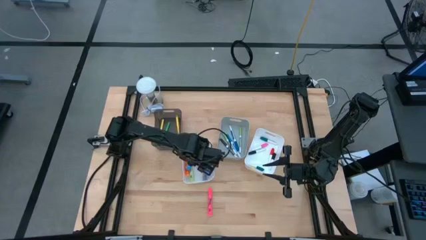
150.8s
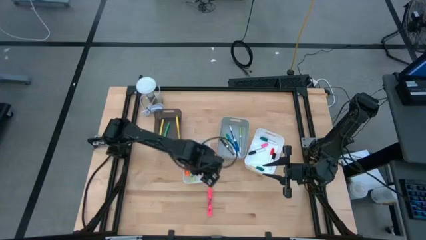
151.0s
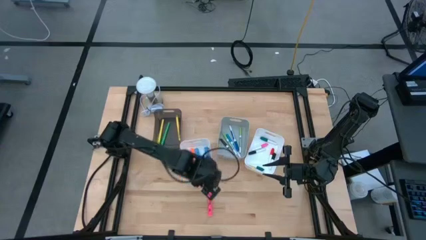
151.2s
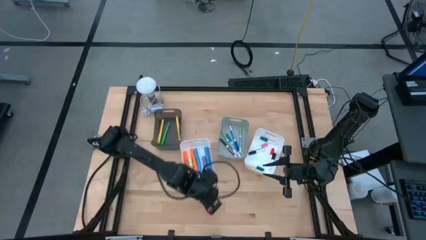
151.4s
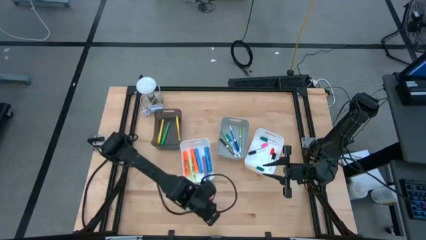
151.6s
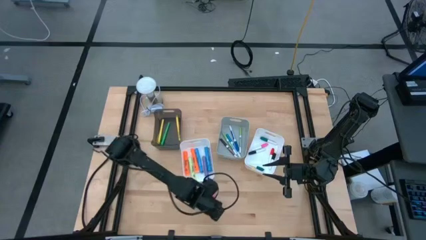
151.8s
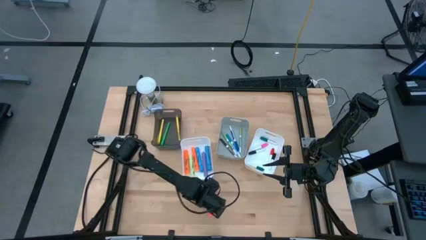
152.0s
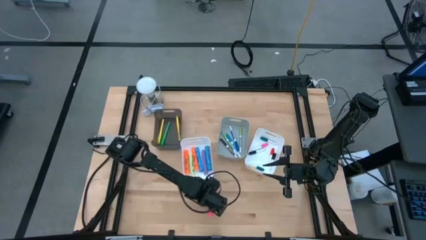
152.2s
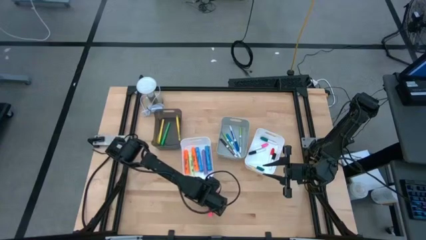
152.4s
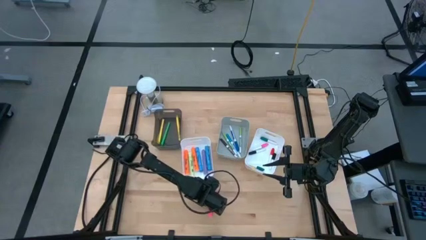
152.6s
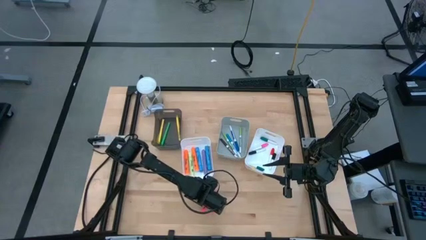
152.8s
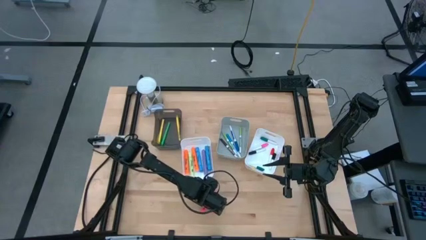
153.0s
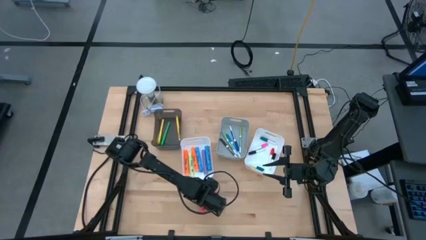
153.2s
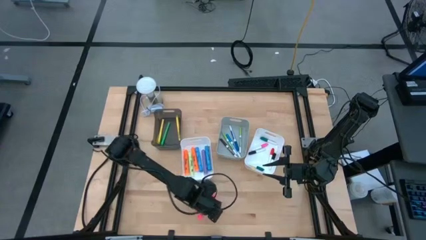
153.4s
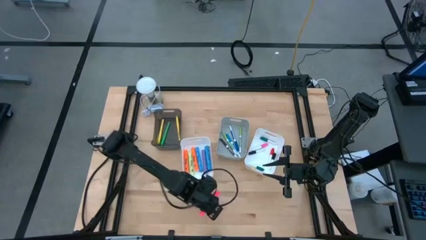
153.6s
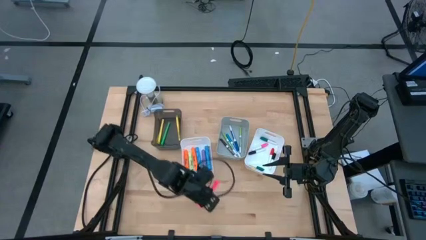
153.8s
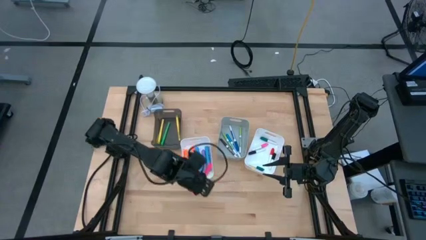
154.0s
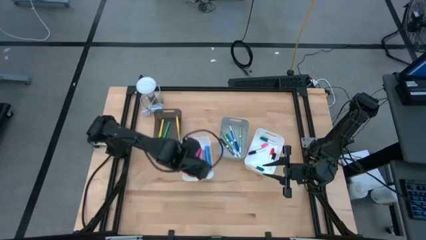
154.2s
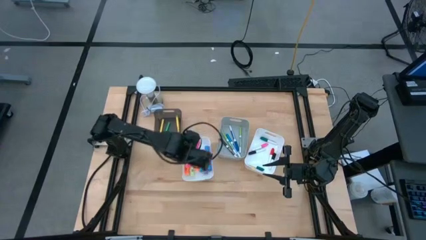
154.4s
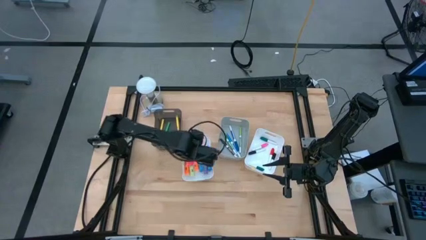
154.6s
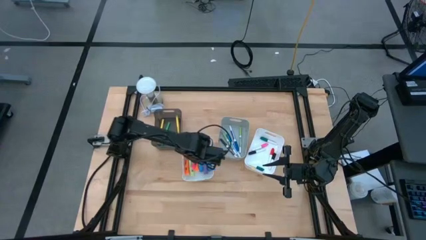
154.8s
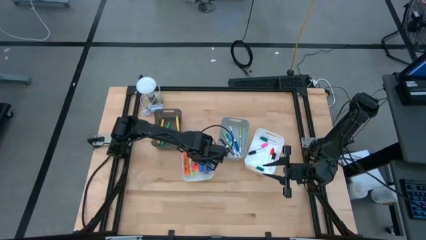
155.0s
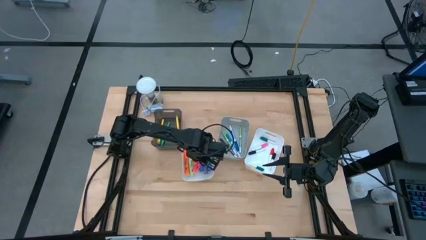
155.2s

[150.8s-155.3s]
Task: Pick & Place Markers
Put the pink highlighter into the left white bin

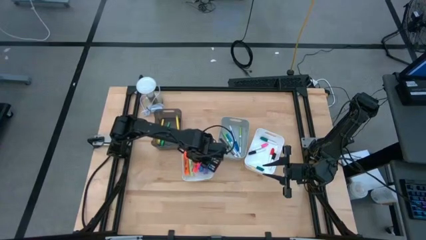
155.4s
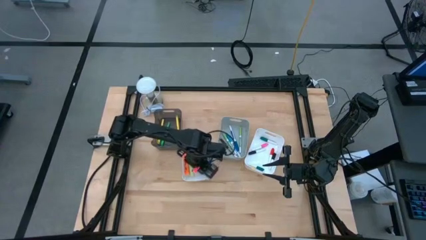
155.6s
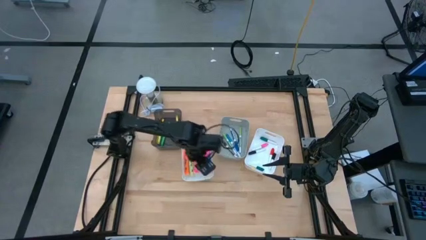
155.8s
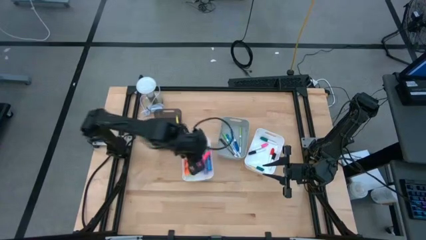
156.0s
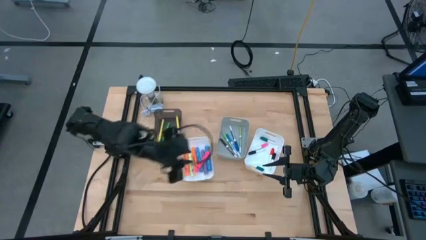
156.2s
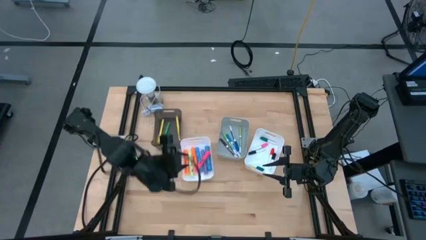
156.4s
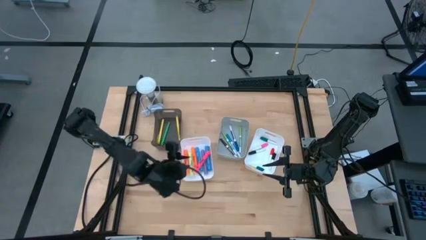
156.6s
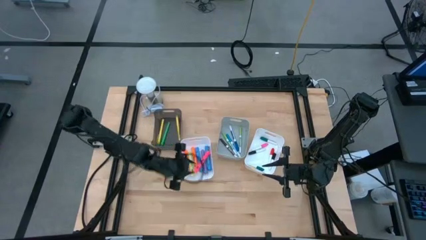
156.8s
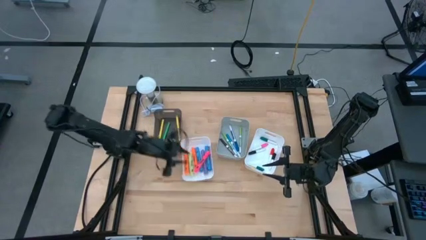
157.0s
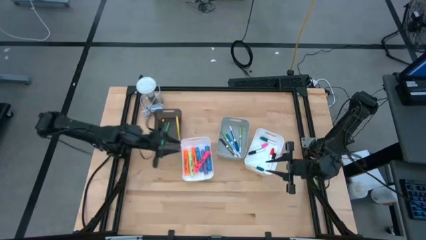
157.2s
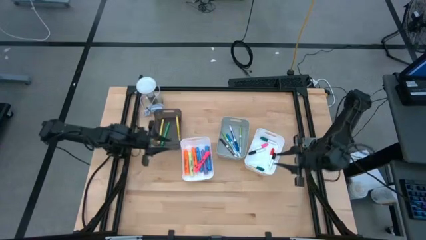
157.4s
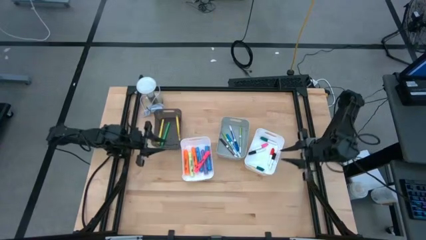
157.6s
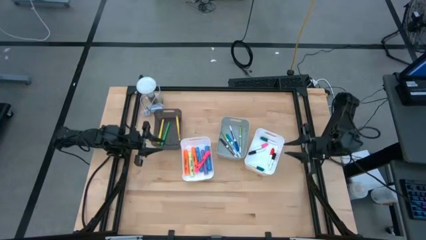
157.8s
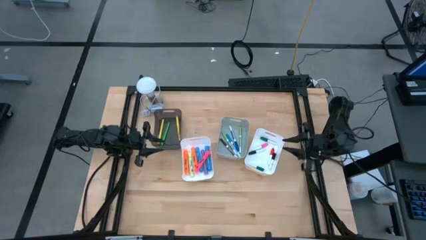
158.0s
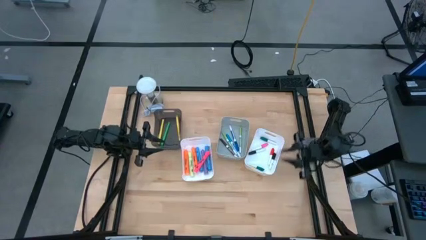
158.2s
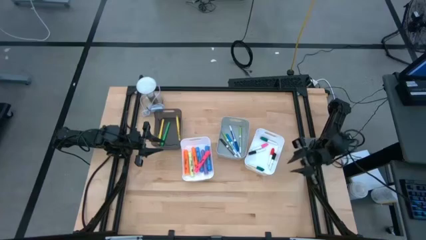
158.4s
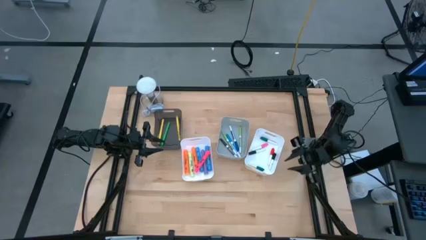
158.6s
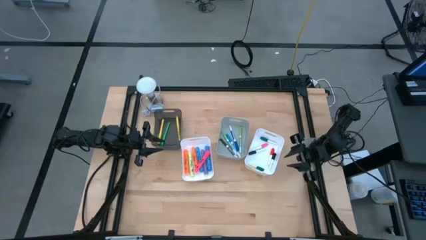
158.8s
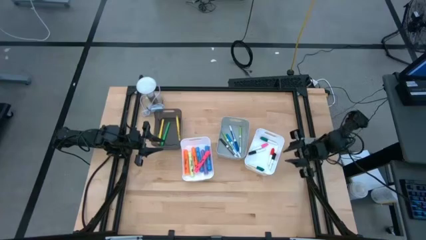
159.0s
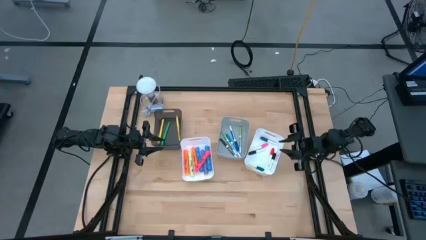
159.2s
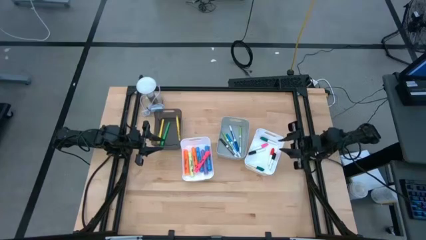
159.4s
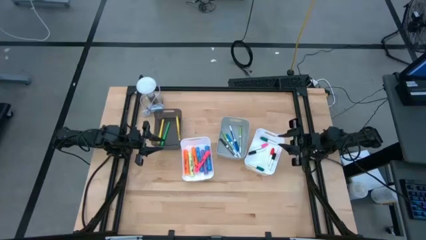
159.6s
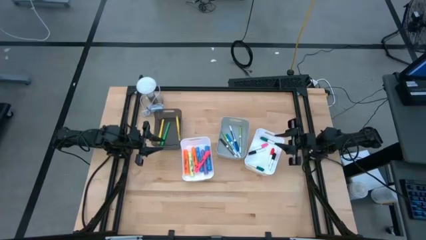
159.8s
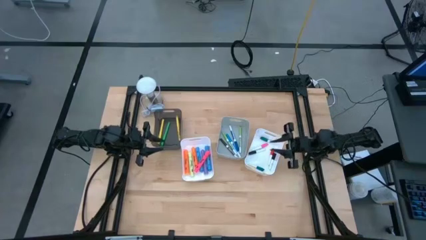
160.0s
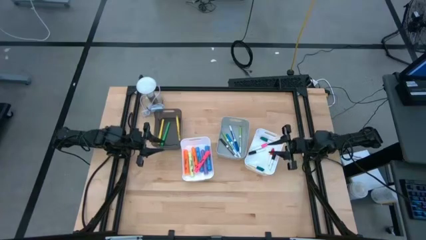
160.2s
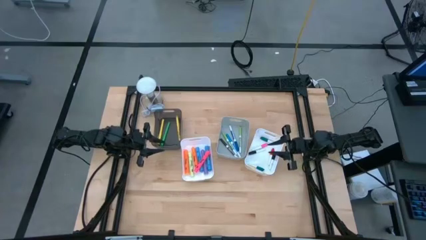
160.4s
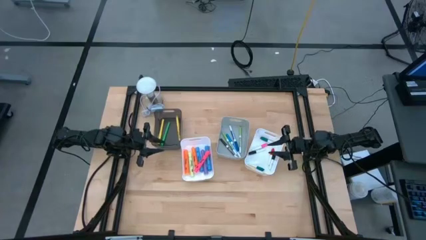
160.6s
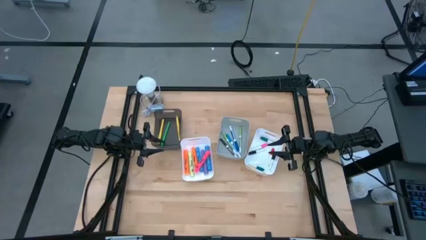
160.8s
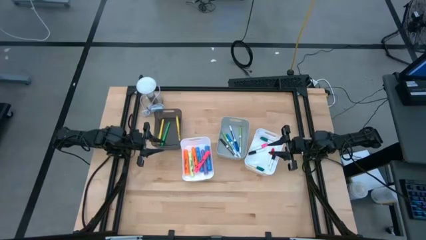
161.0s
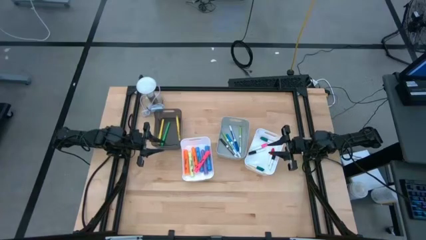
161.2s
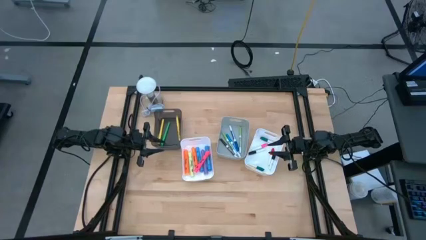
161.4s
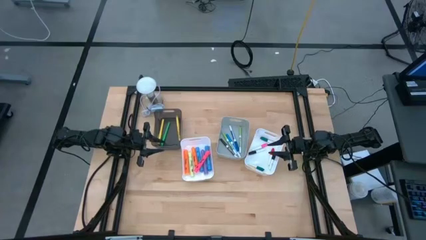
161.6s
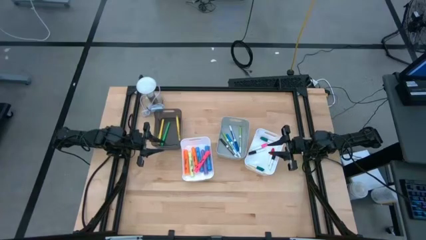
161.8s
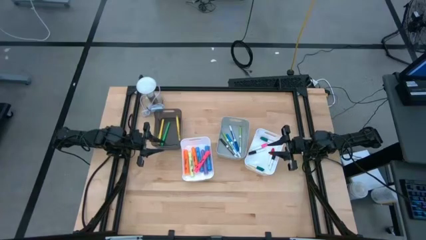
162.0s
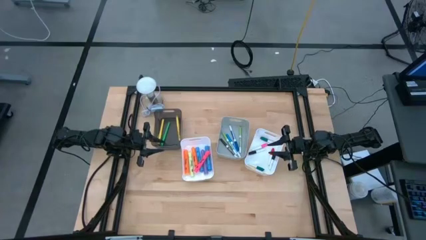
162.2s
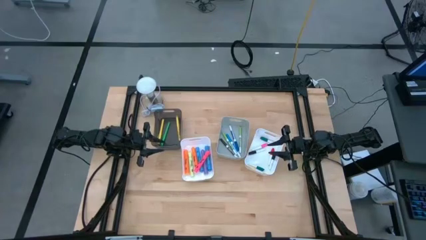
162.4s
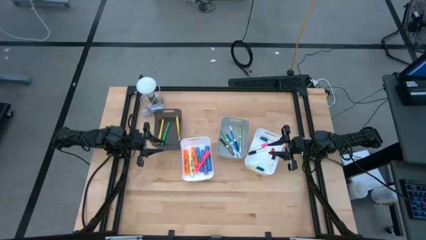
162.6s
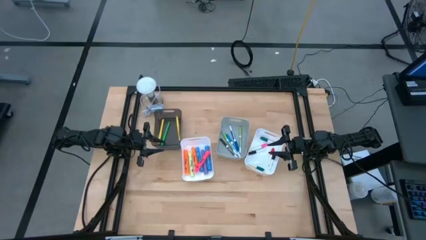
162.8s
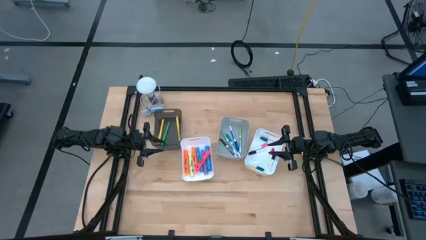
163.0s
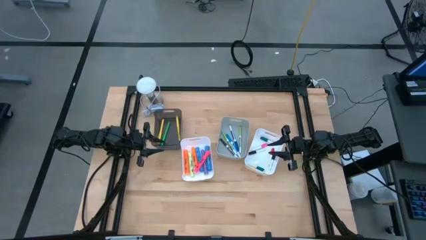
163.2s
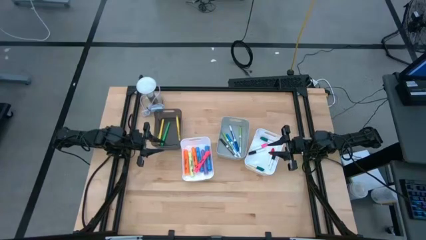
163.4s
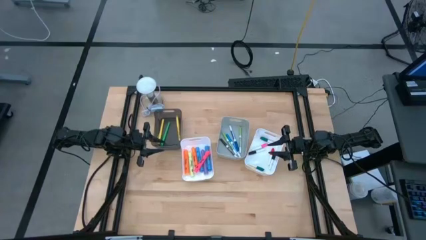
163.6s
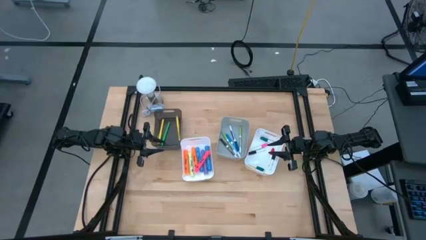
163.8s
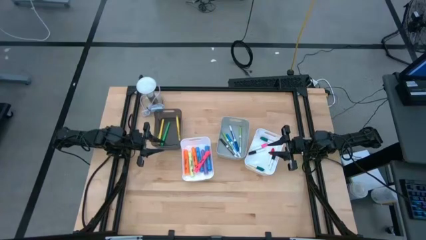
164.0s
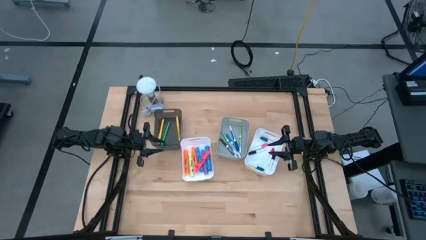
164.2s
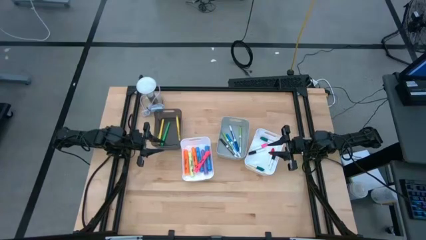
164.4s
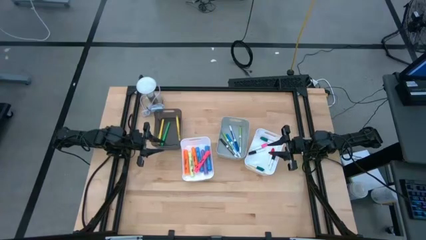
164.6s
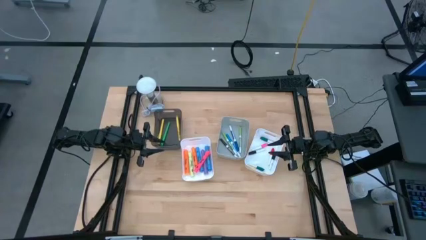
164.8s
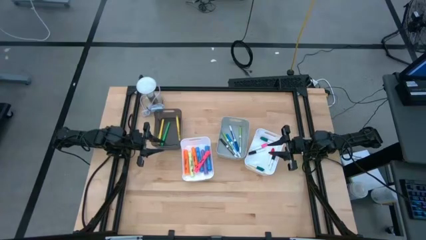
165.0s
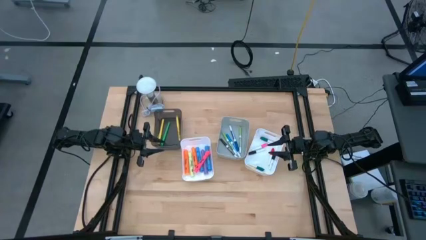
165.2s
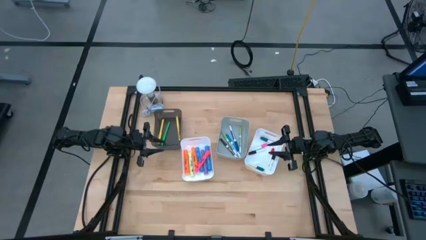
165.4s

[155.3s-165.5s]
Return to Home Position
